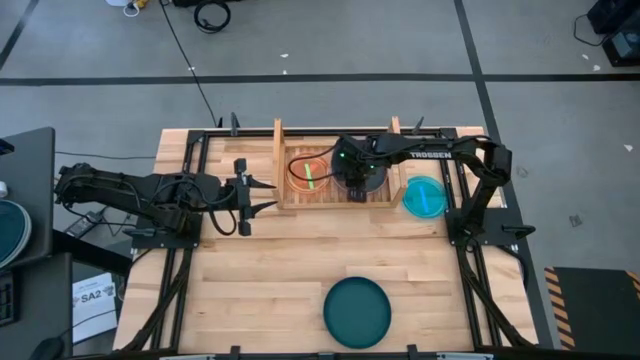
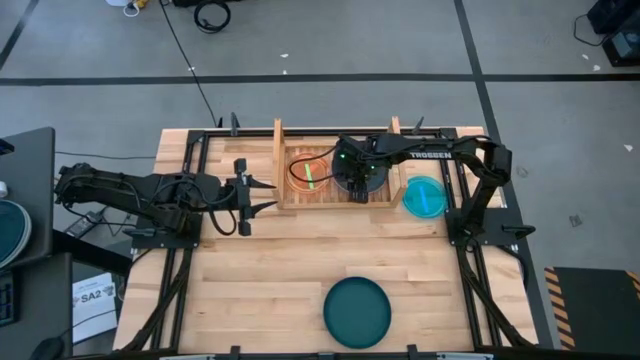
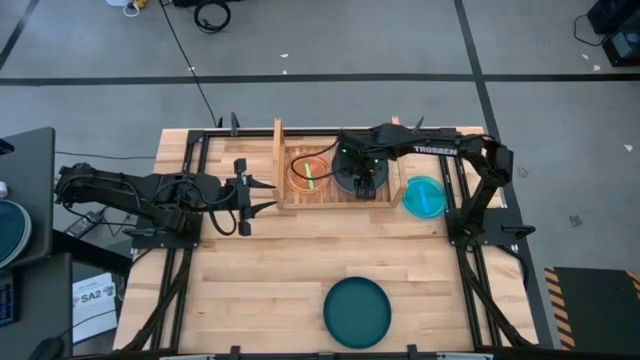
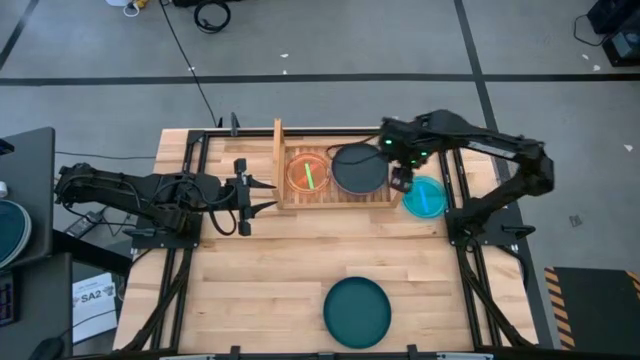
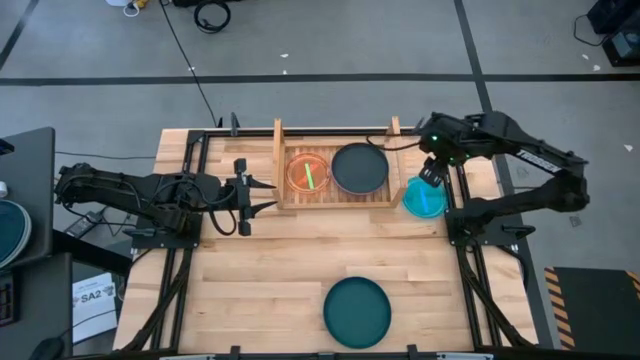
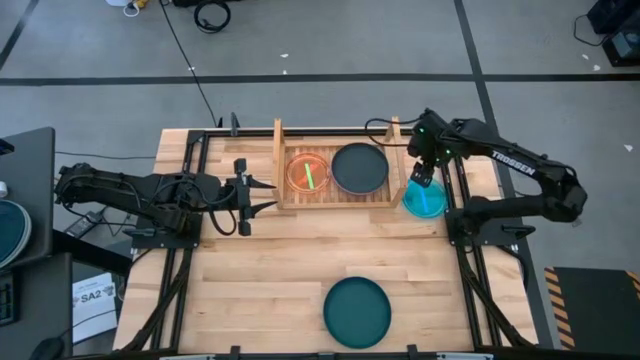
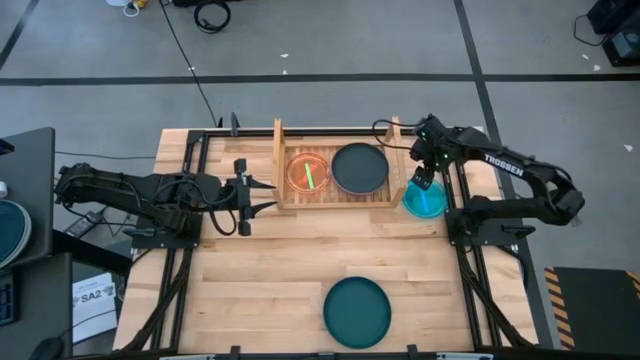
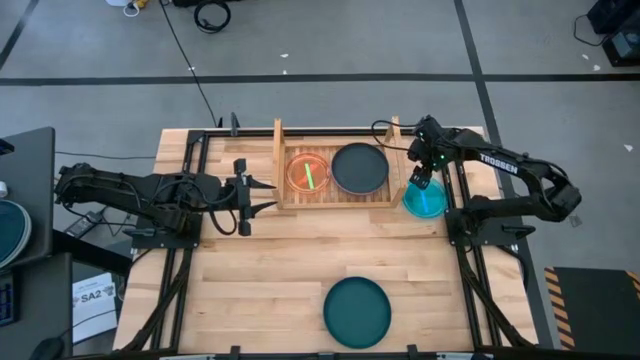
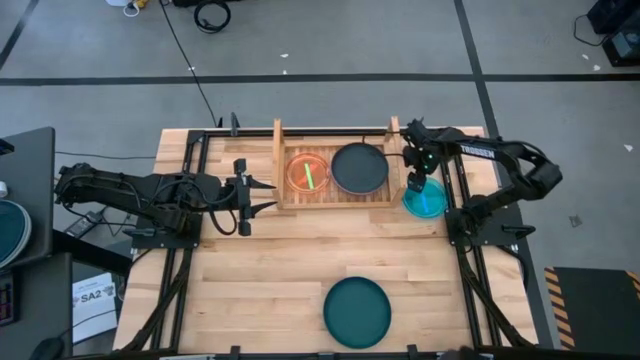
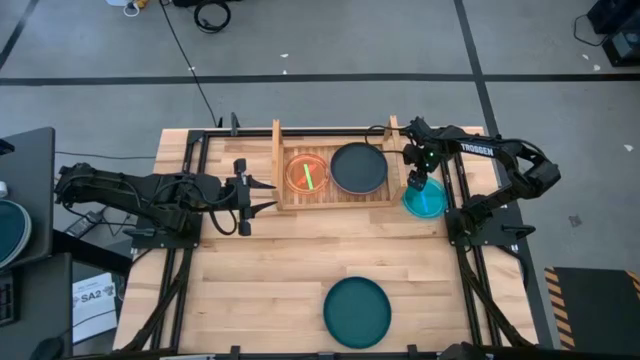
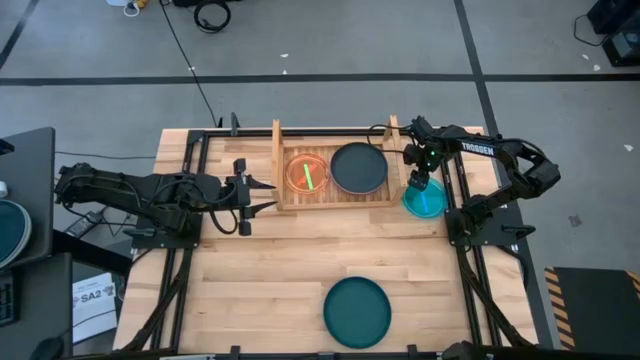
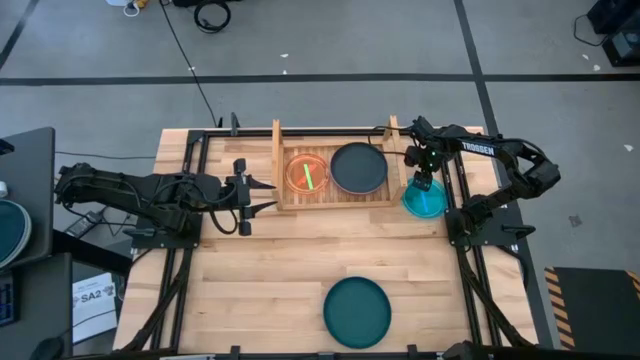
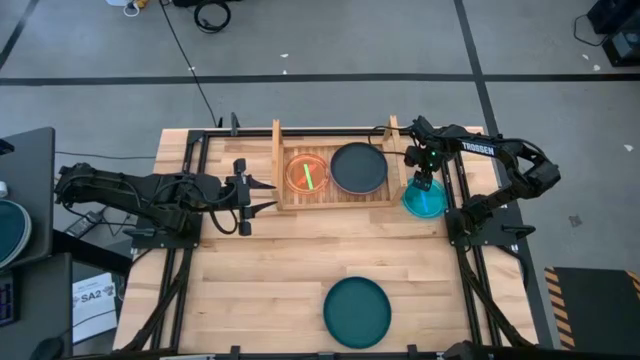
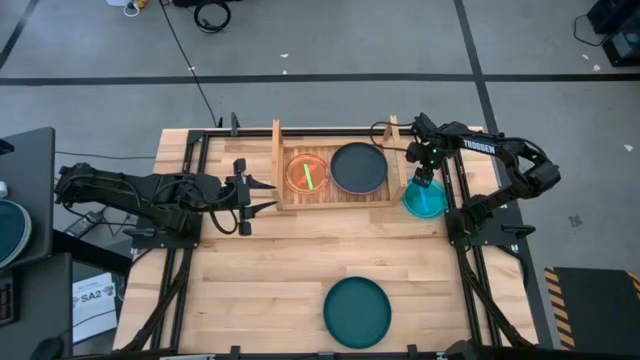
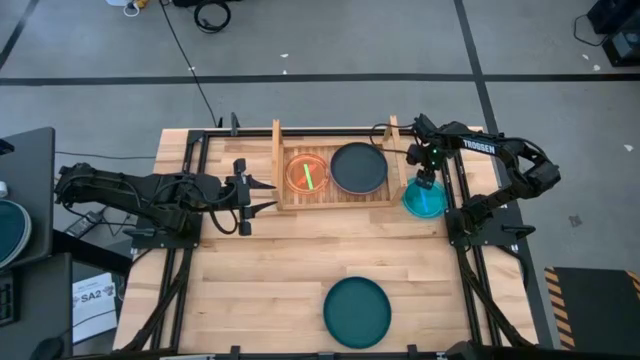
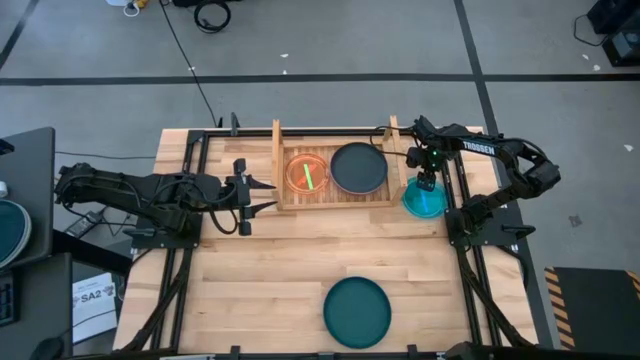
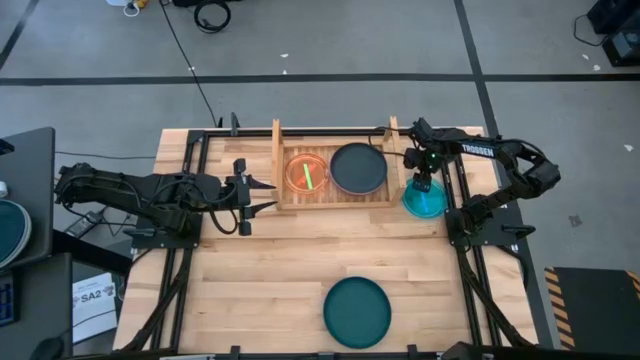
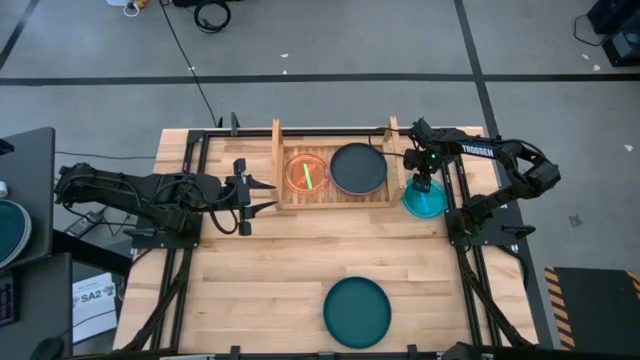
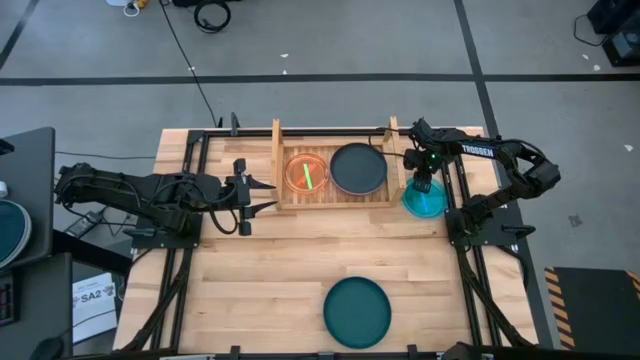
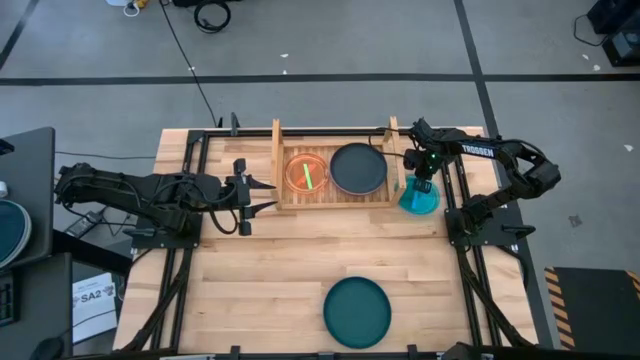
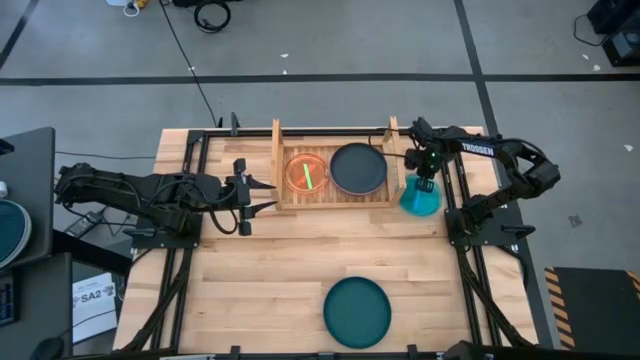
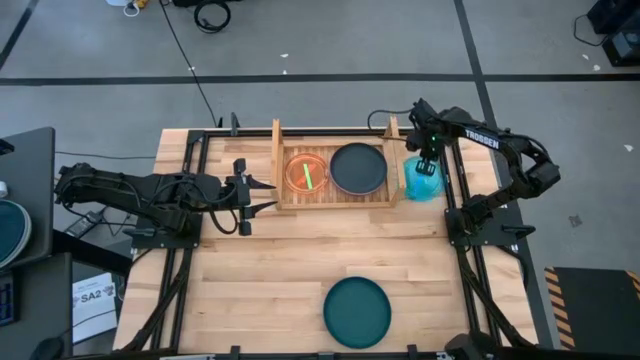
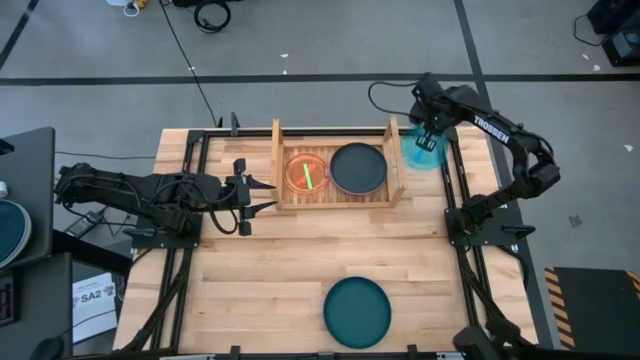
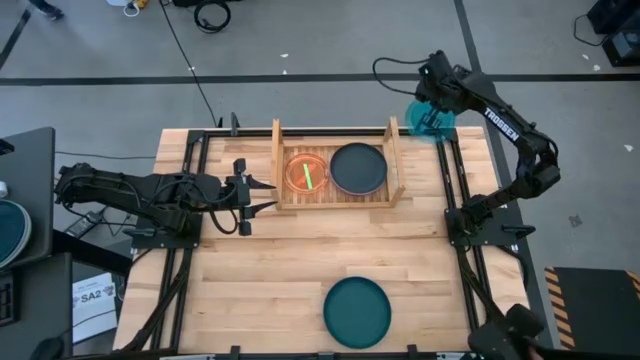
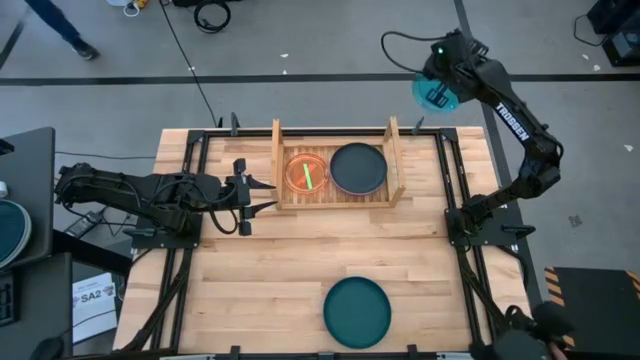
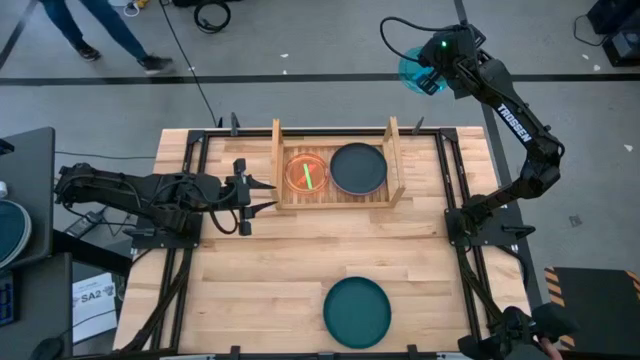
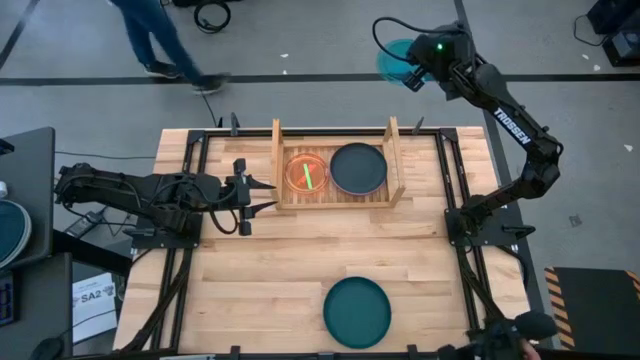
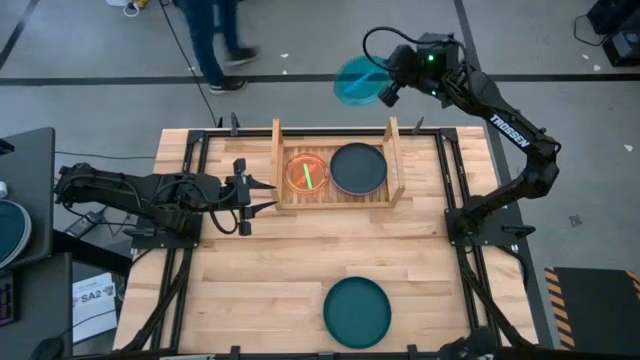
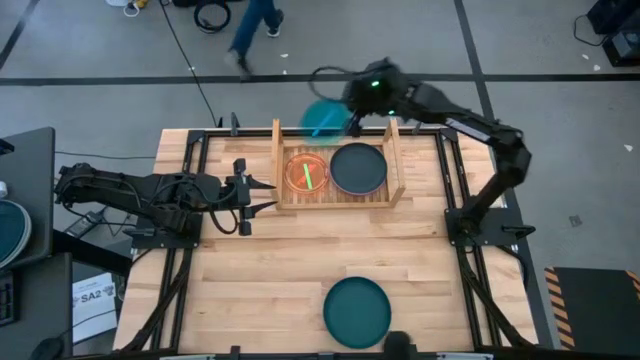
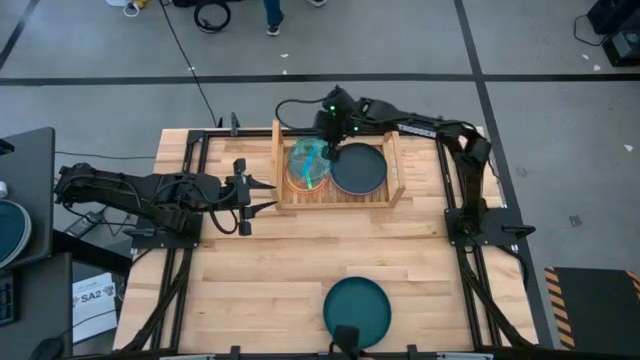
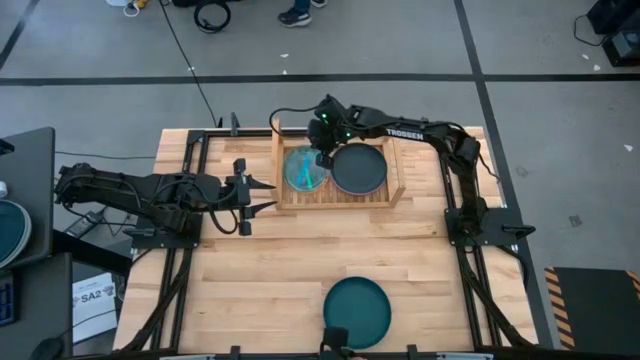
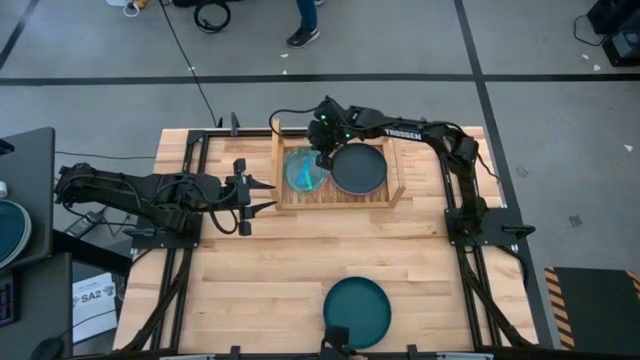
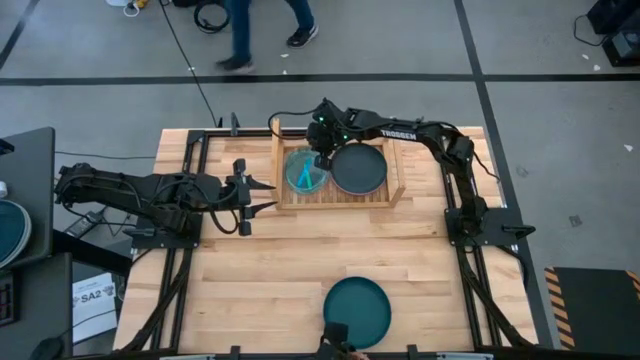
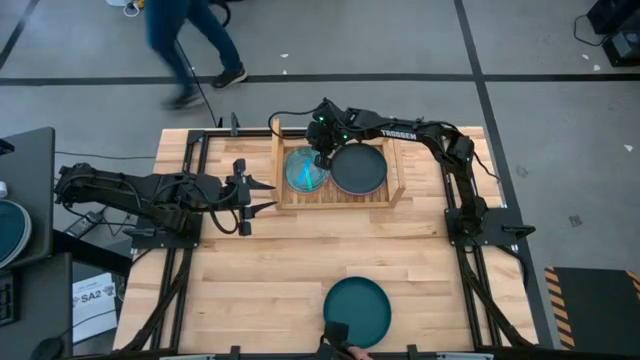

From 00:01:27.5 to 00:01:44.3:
Task: Place and stack plates onto a shelf
Stack the small blue plate on top of the small orange plate on the shelf

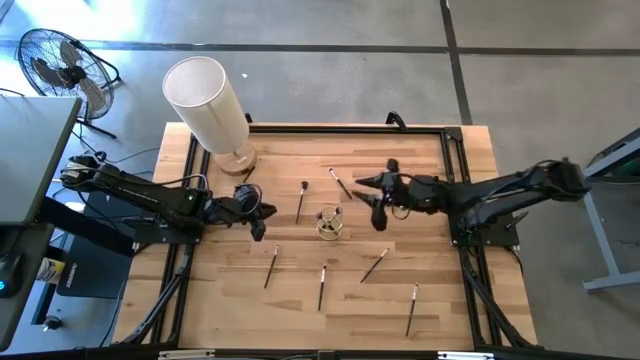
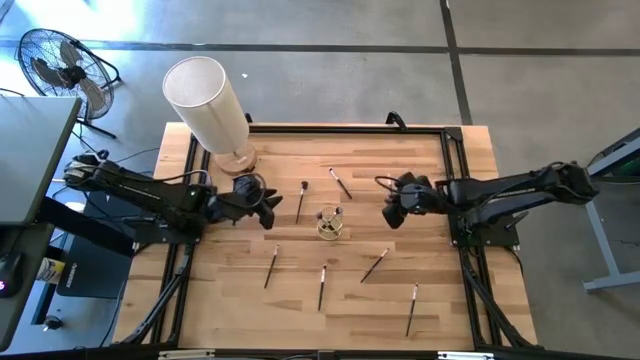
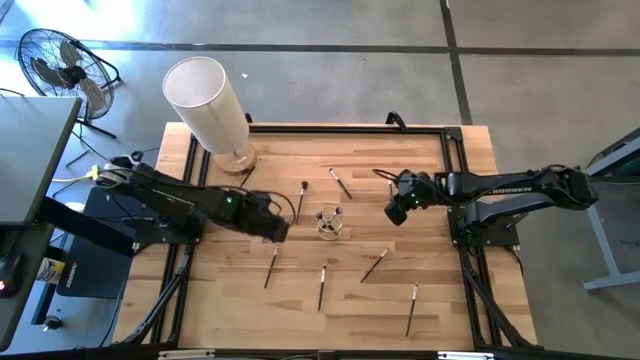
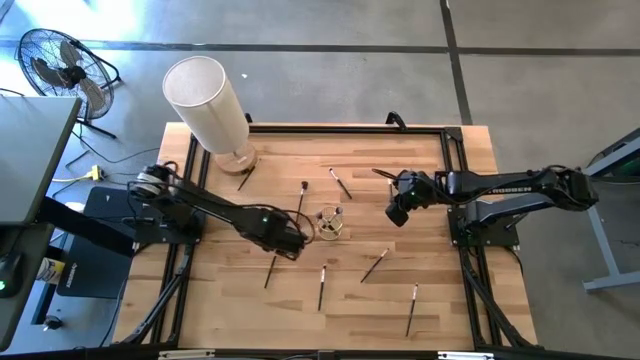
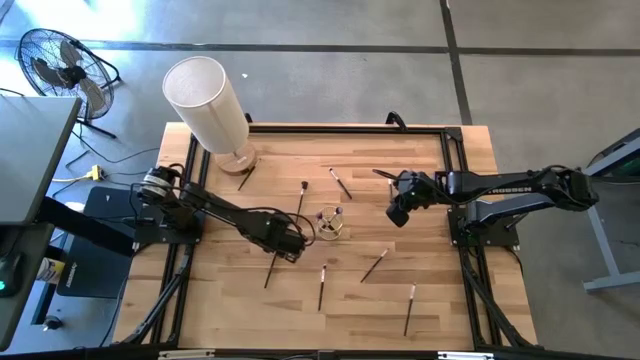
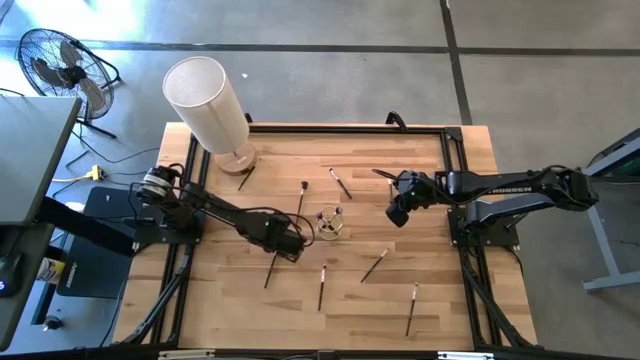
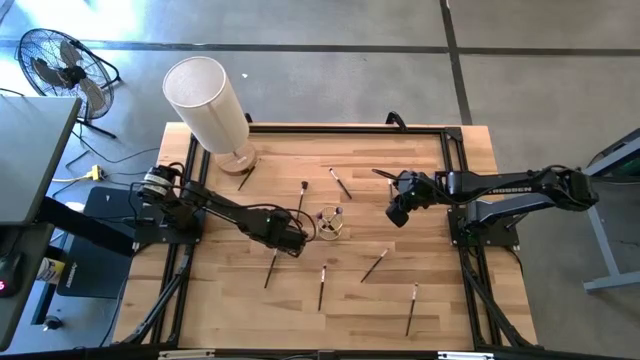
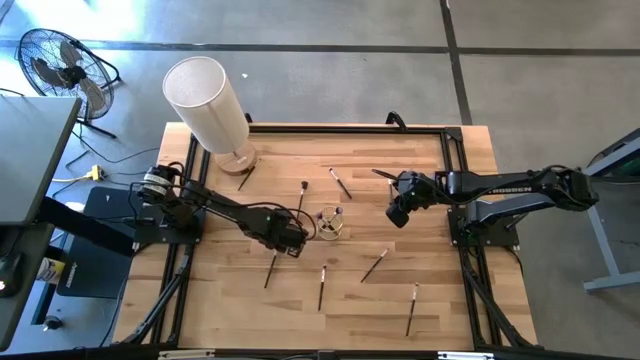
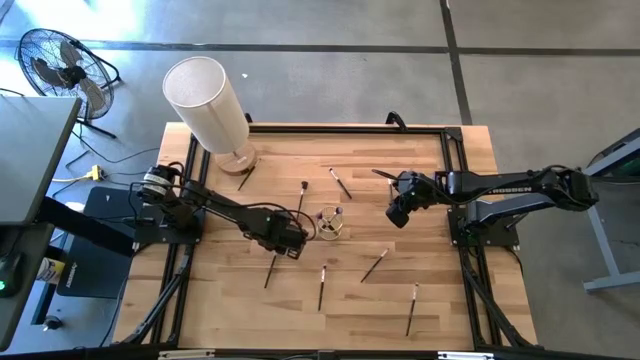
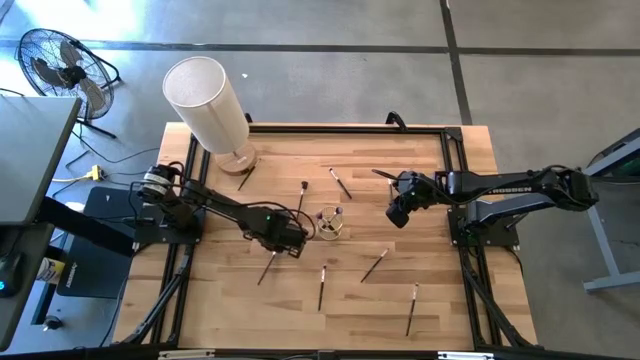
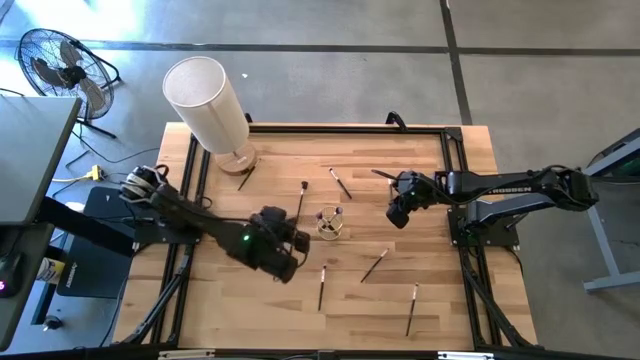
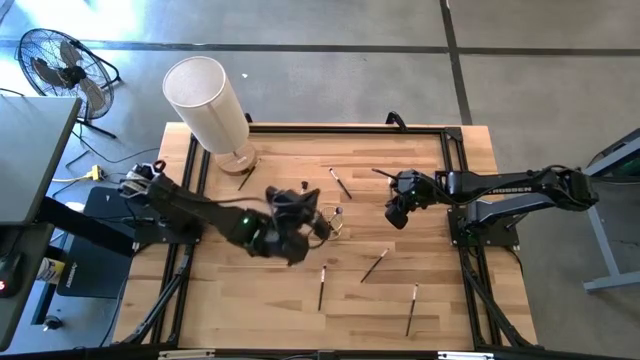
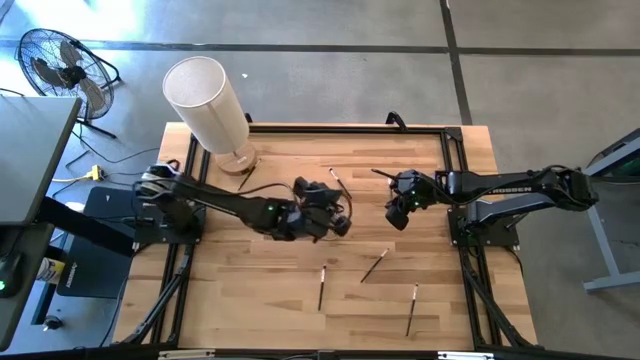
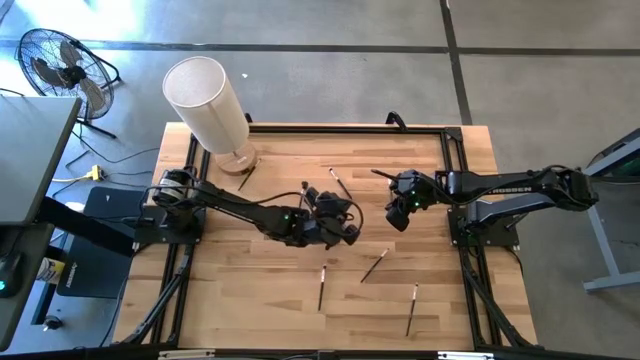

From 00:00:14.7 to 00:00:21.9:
Task: Put items in baskets/containers
Put the eyeshadow brush into the wire organizer
